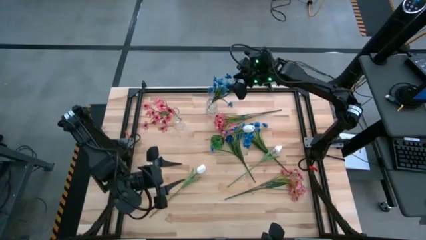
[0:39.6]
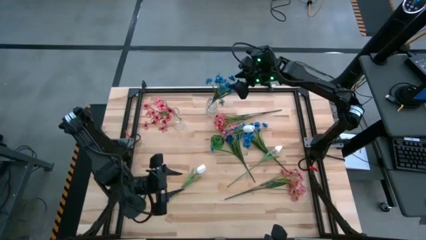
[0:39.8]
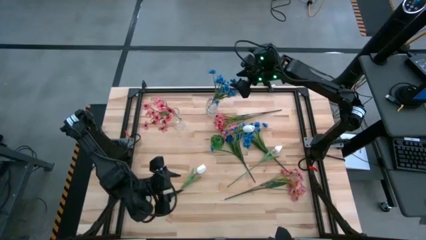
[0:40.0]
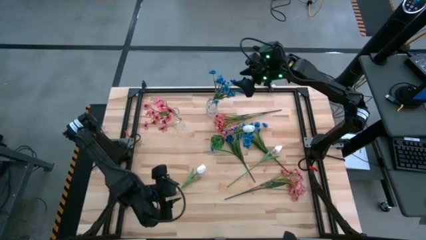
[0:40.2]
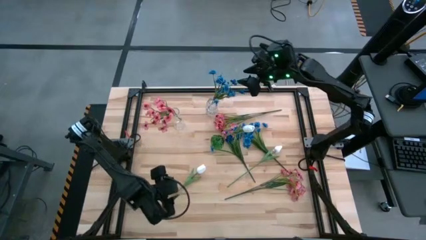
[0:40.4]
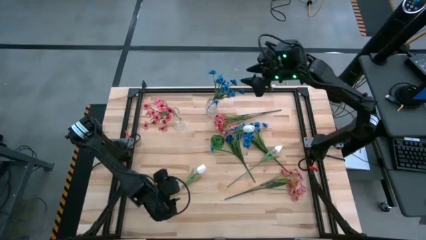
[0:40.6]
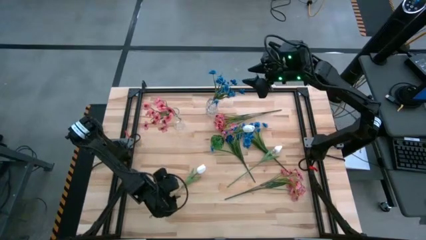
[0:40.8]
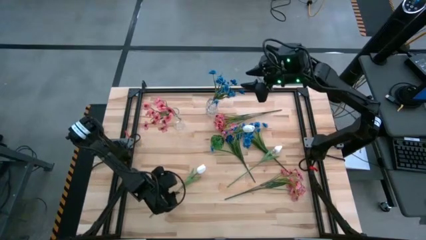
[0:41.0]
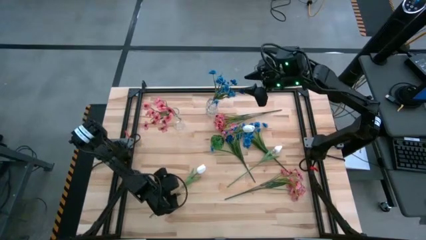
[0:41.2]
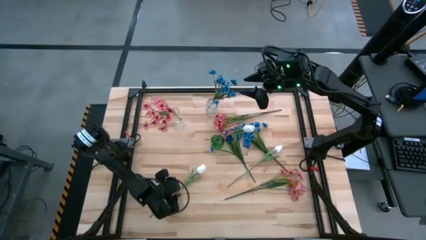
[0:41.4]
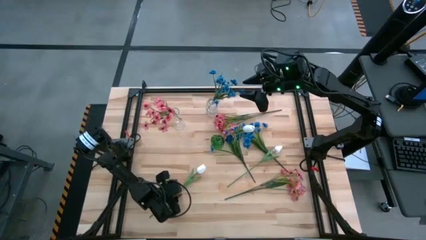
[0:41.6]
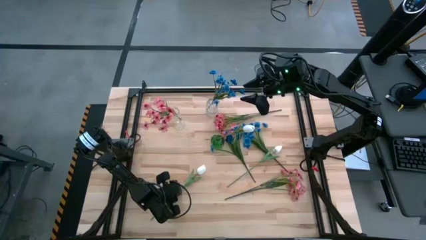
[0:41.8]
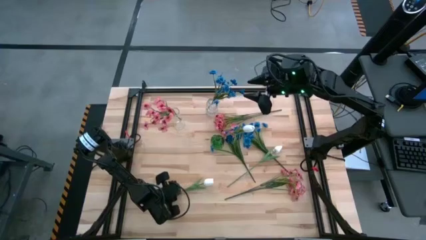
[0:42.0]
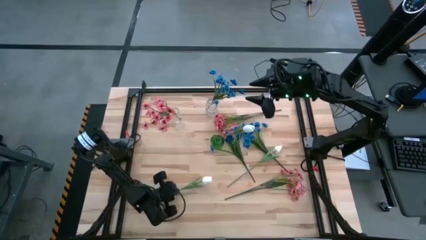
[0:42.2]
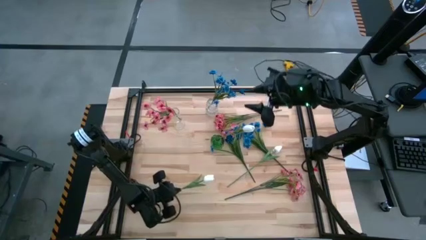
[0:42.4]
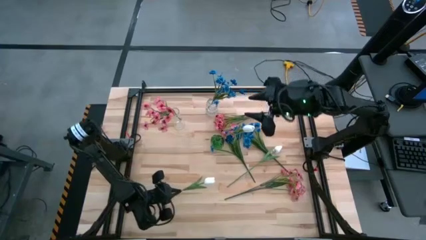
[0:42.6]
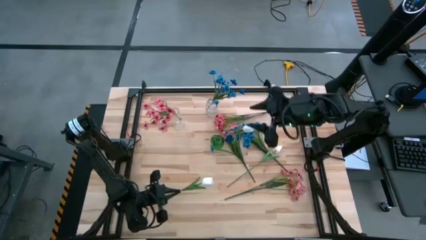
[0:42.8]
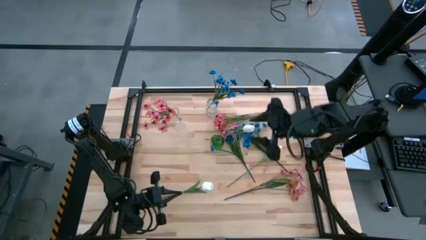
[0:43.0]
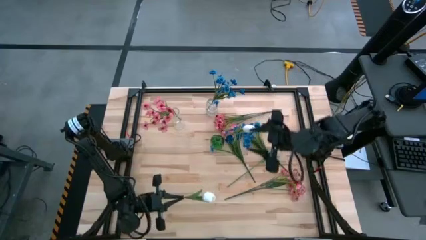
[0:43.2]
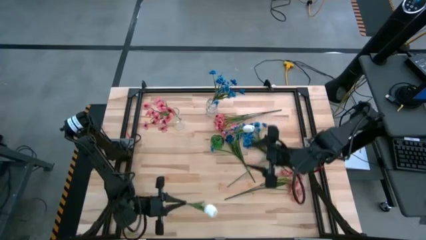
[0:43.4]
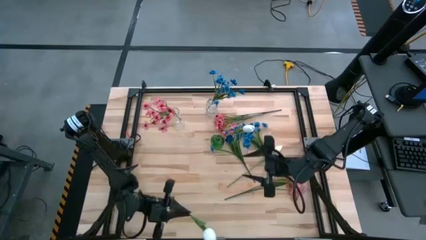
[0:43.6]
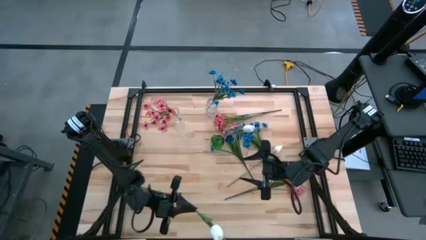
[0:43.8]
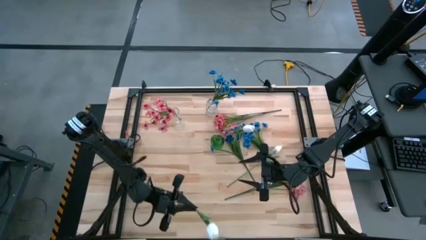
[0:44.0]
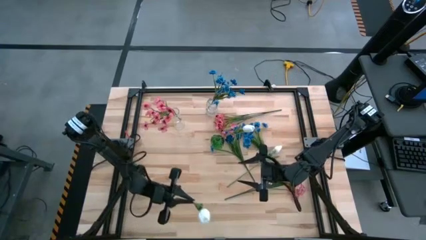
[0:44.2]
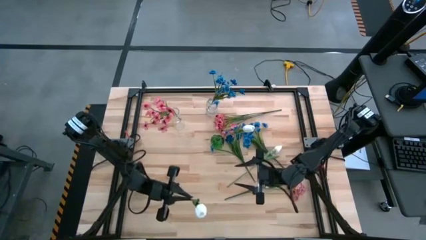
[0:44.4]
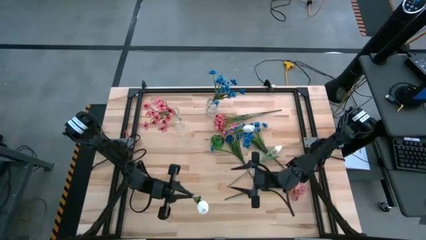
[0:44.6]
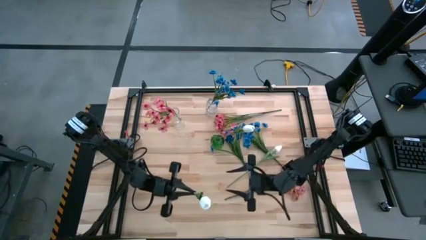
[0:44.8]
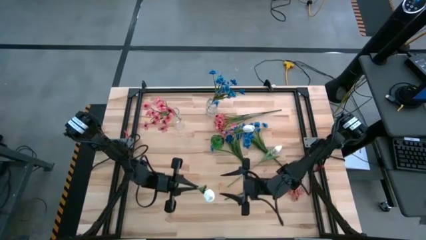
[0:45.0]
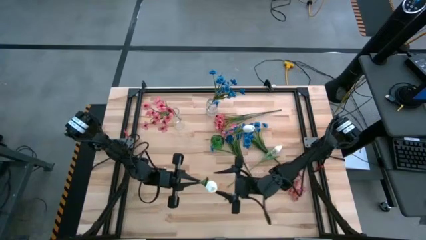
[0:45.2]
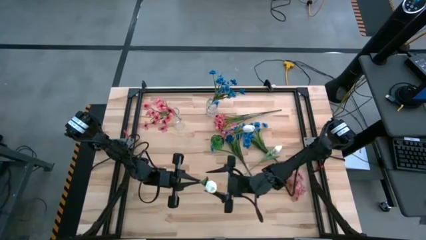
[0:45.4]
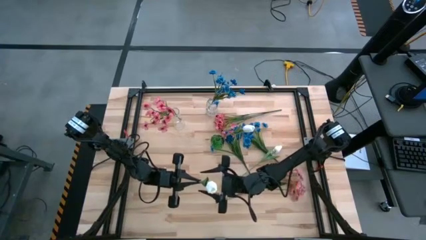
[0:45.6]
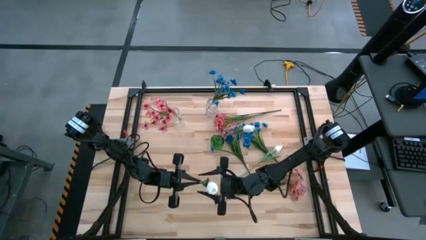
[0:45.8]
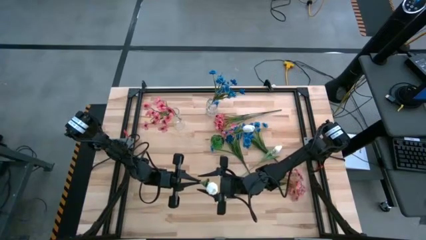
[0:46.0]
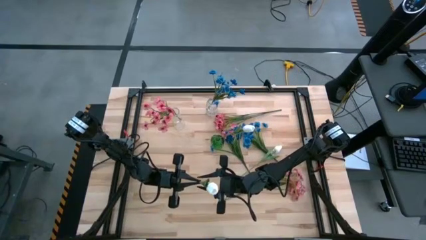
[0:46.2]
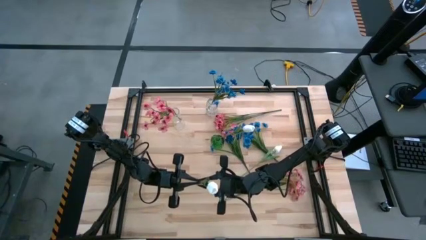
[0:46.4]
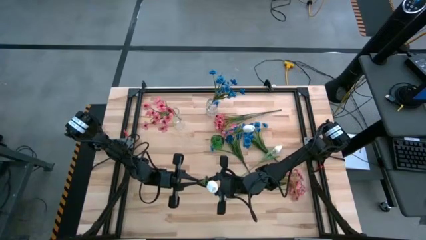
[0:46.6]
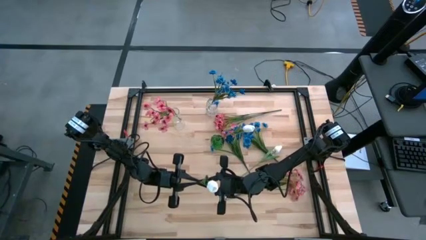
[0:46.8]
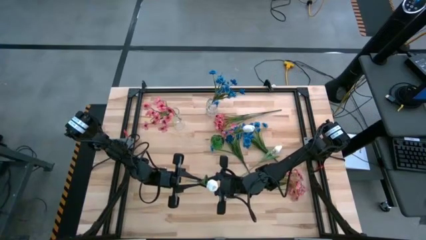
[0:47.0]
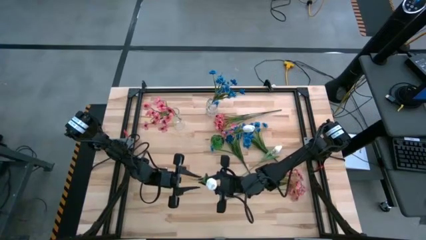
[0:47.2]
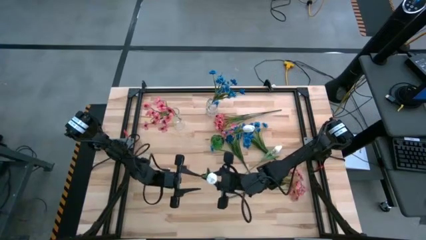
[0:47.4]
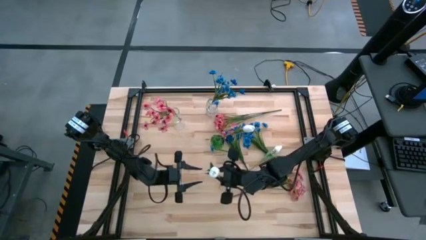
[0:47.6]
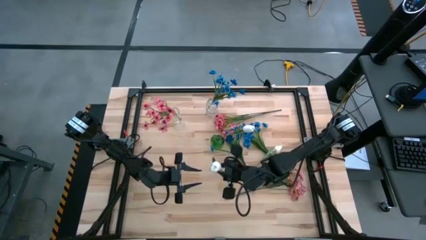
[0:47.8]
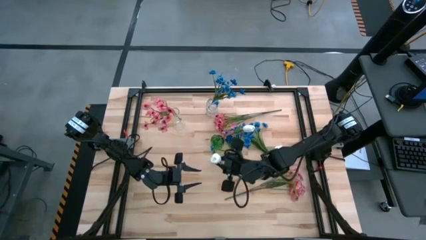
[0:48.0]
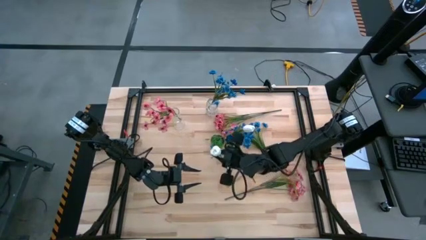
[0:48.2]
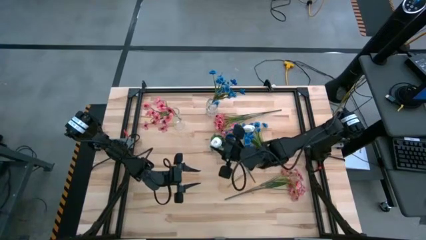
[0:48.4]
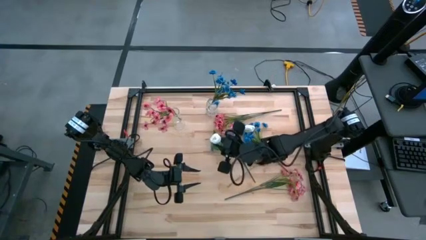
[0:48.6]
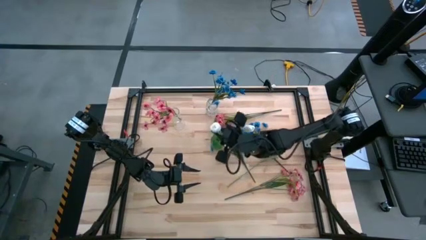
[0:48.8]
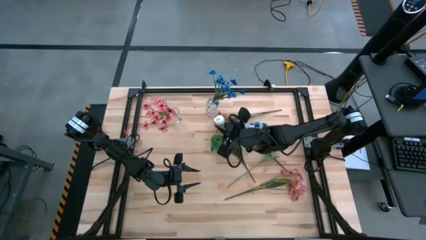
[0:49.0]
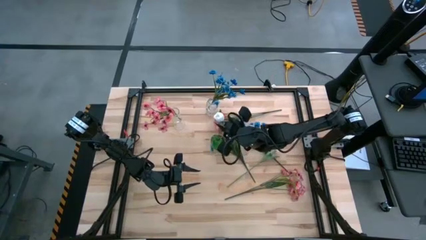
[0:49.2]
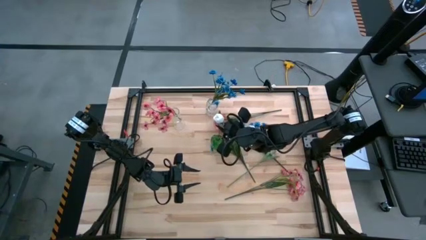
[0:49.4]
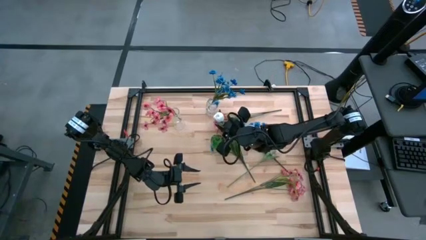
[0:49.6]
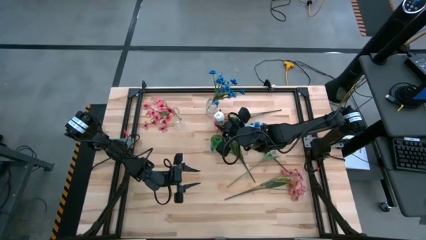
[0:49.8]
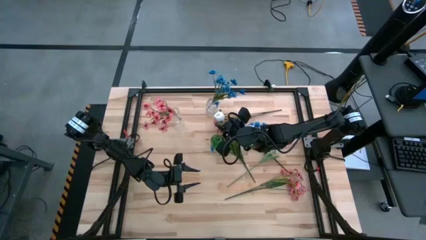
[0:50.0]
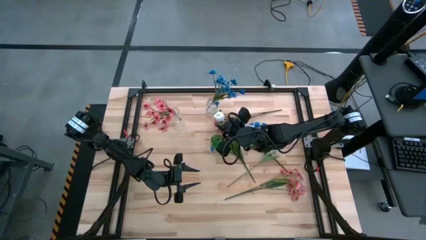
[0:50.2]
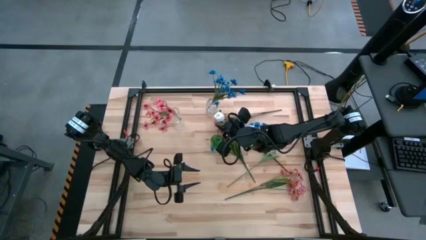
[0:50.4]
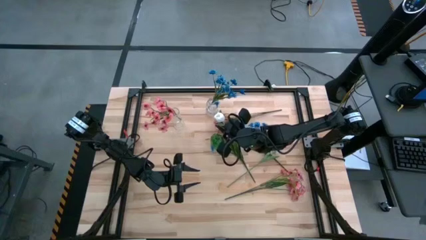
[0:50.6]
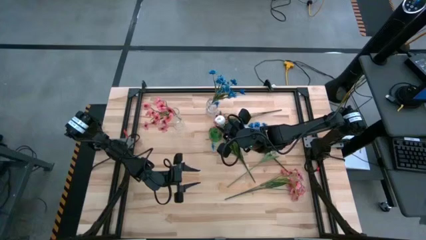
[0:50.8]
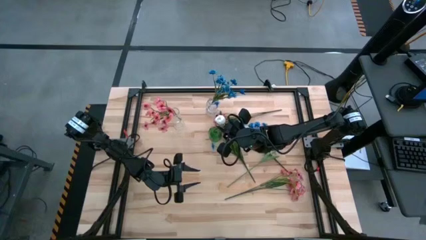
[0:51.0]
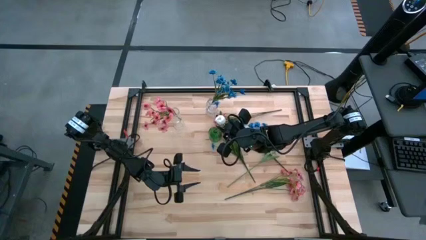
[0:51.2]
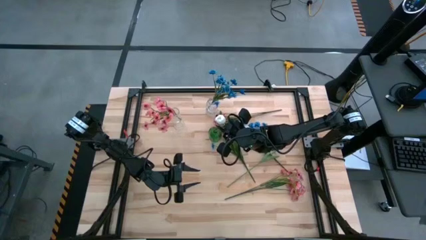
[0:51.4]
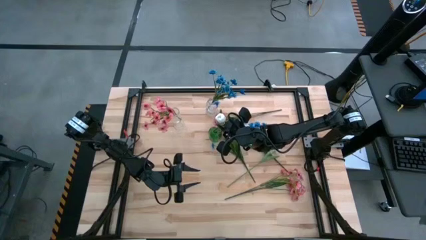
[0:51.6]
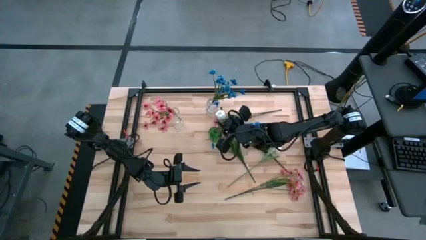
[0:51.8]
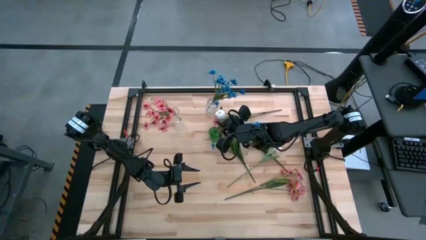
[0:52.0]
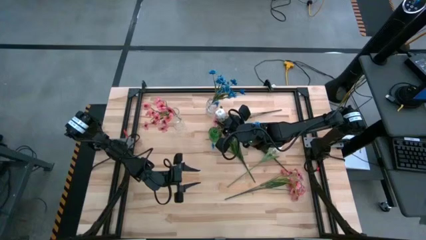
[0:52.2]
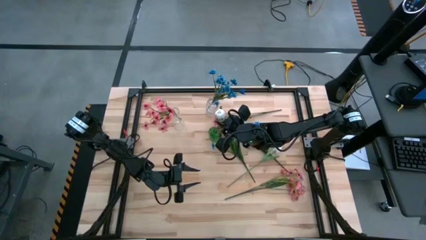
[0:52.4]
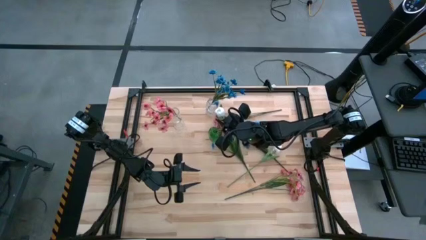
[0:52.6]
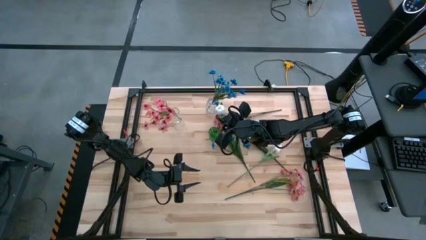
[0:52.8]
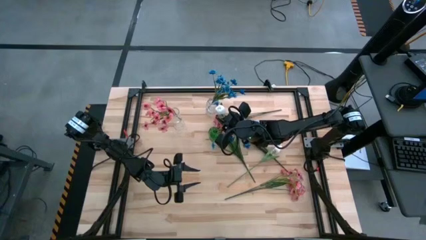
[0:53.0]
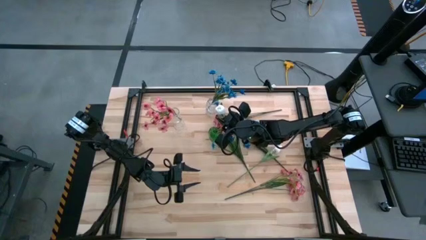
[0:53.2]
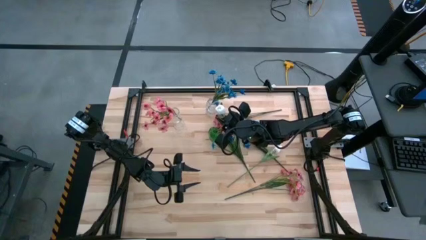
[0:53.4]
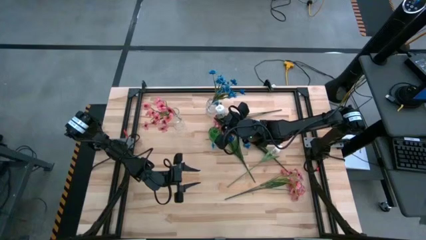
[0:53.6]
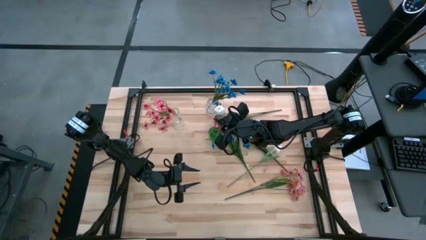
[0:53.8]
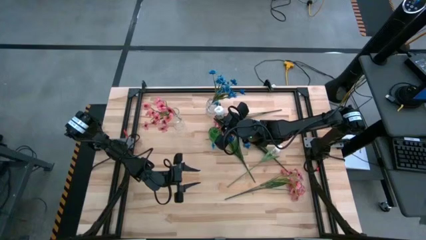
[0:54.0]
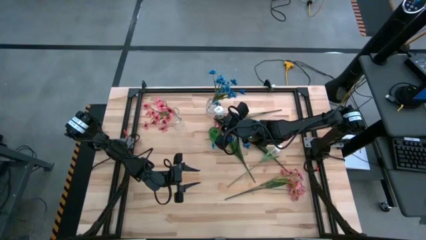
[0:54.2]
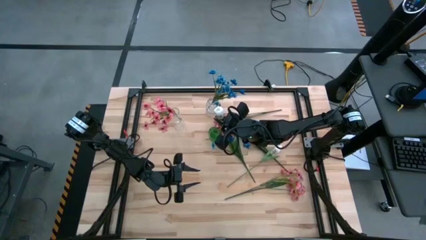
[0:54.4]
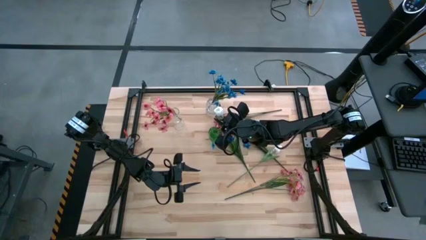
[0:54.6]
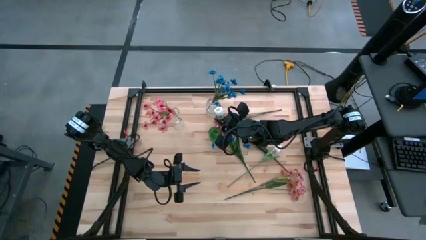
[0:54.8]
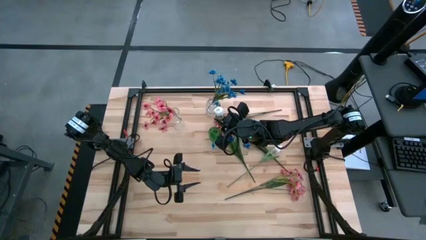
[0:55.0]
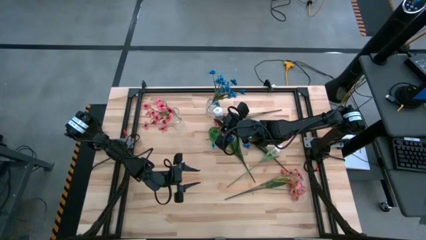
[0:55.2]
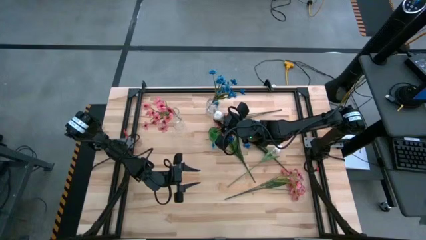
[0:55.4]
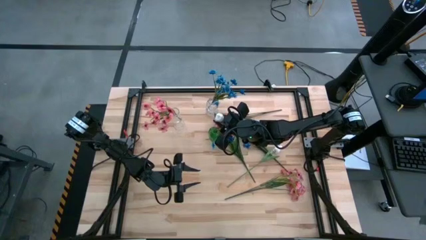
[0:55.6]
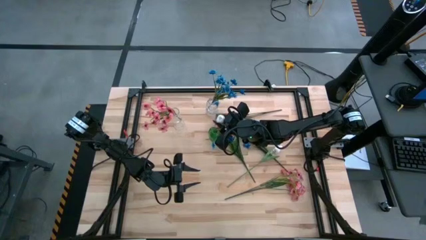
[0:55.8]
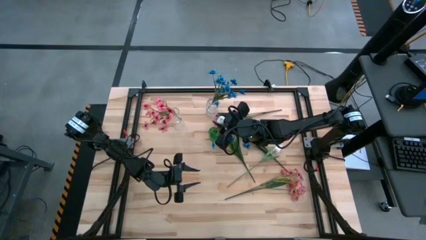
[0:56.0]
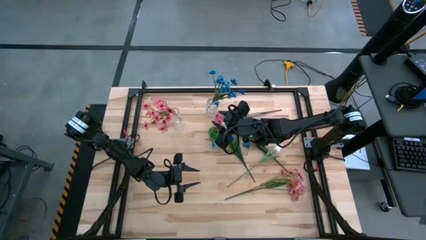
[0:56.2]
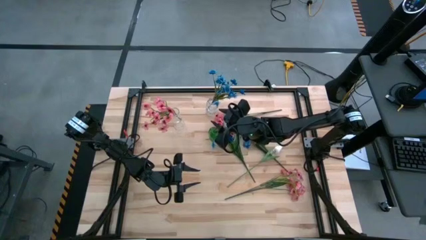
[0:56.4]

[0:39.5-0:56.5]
Task: Sort flowers into vase by color
Put the left white tulip flower into the green vase

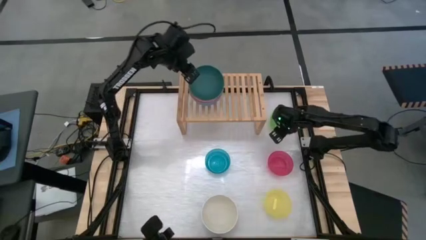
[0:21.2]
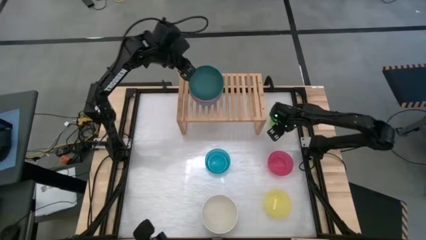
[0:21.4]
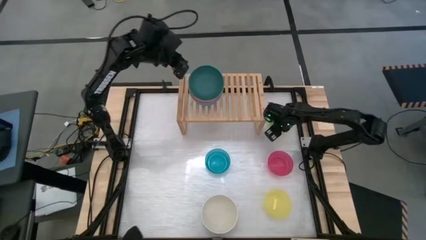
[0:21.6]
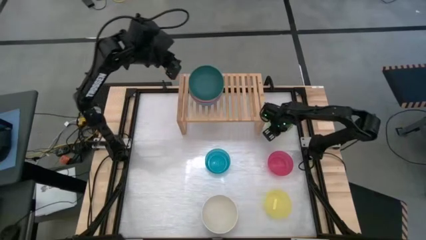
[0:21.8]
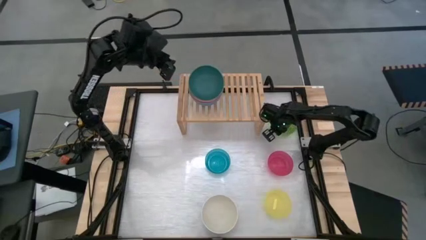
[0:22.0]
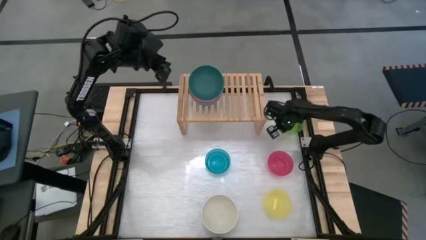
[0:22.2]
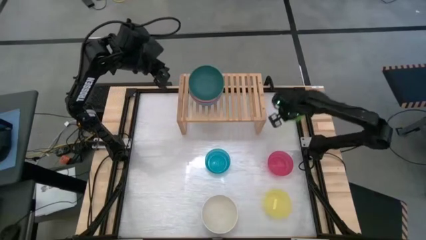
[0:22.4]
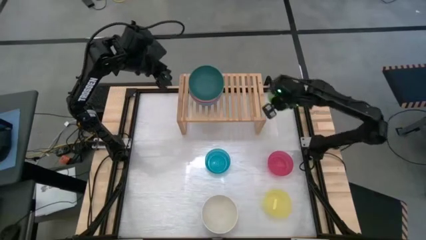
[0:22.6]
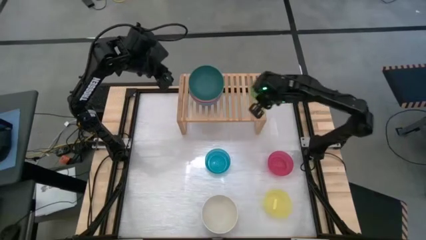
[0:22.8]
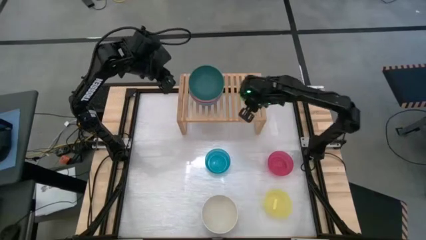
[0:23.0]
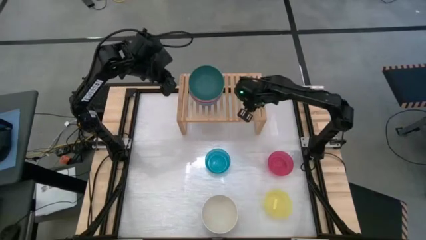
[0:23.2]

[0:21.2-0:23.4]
Task: Place and stack bowls onto a shelf
Put the green bowl on the shelf
